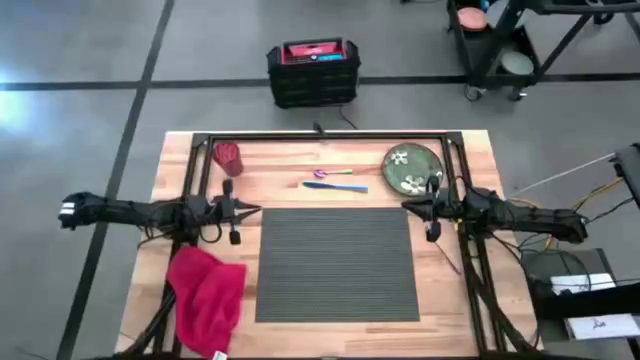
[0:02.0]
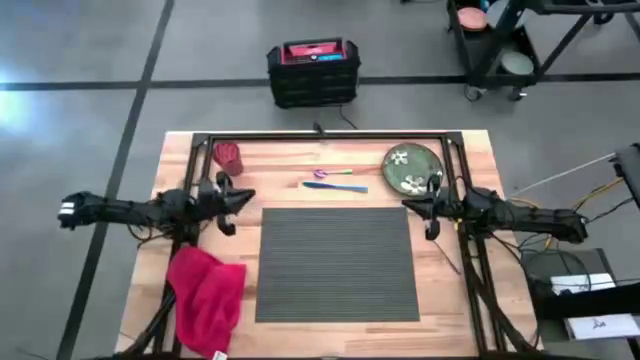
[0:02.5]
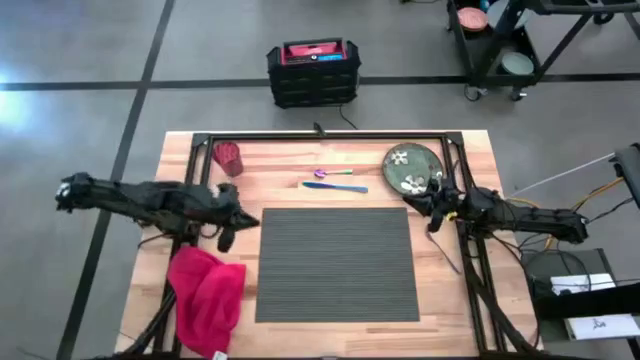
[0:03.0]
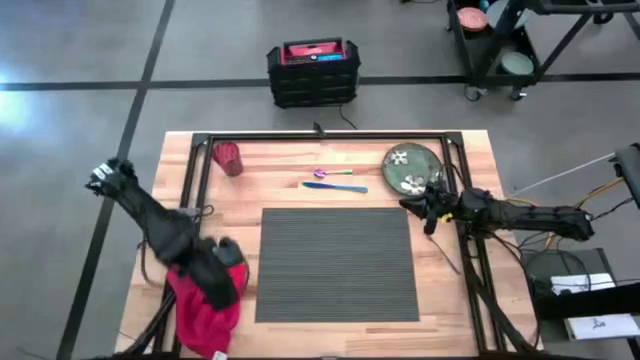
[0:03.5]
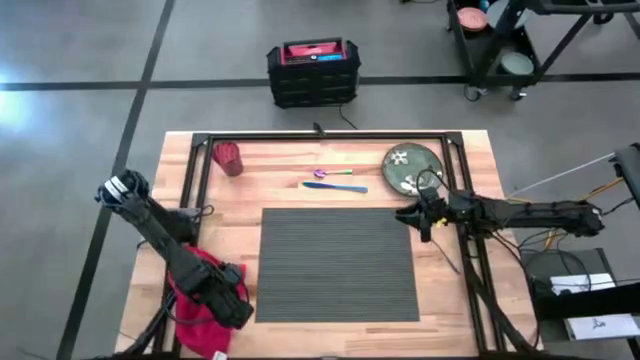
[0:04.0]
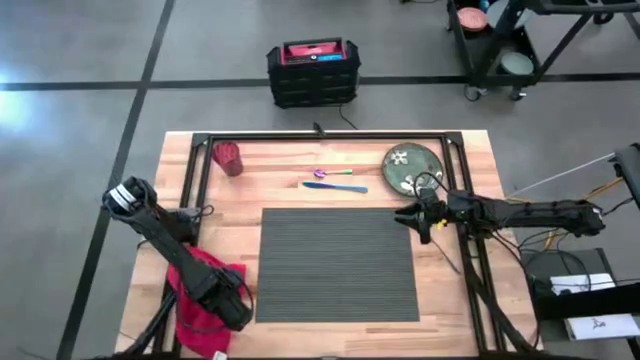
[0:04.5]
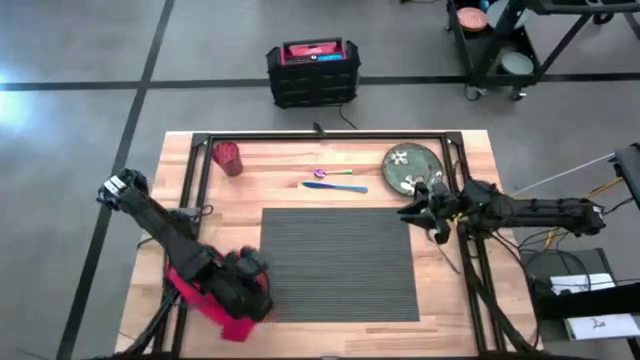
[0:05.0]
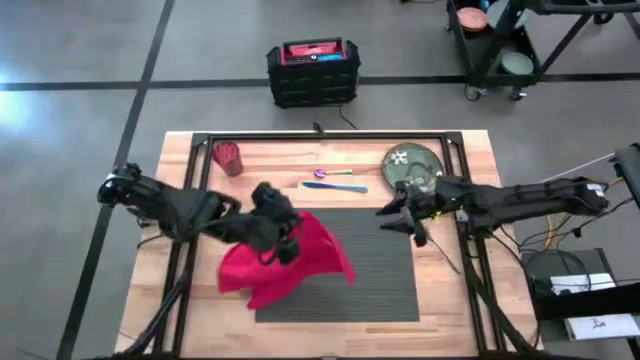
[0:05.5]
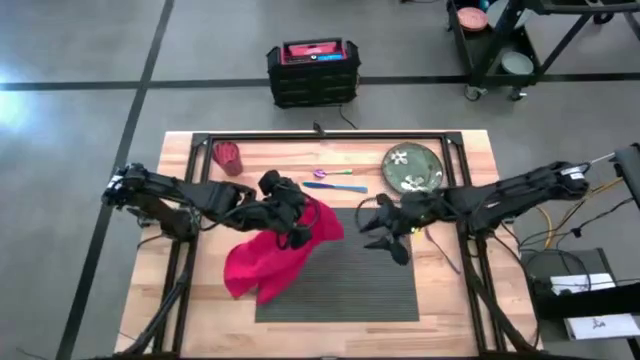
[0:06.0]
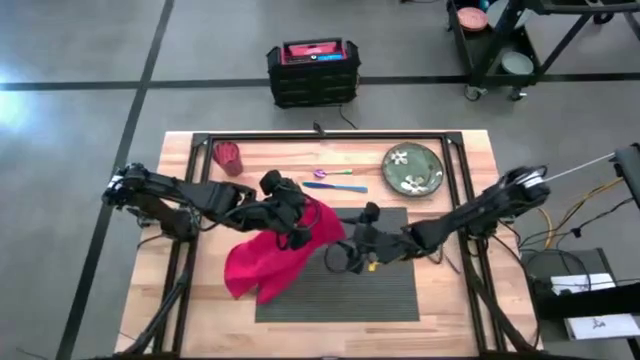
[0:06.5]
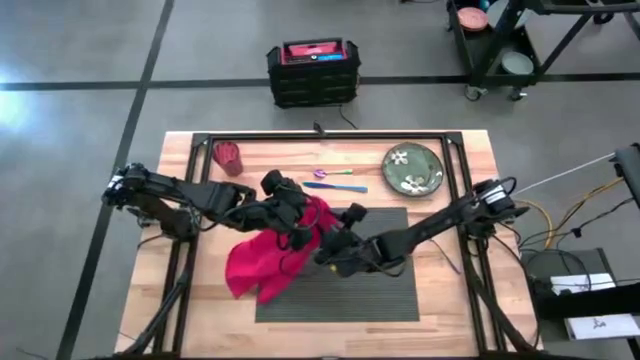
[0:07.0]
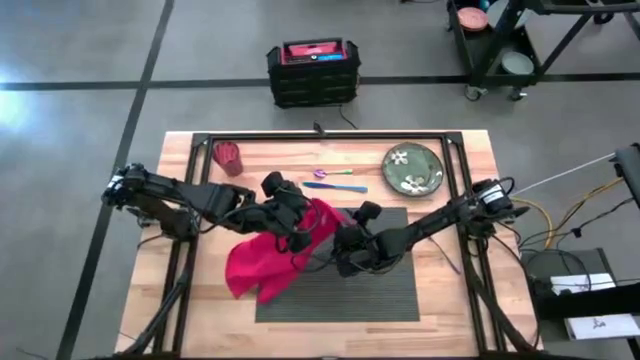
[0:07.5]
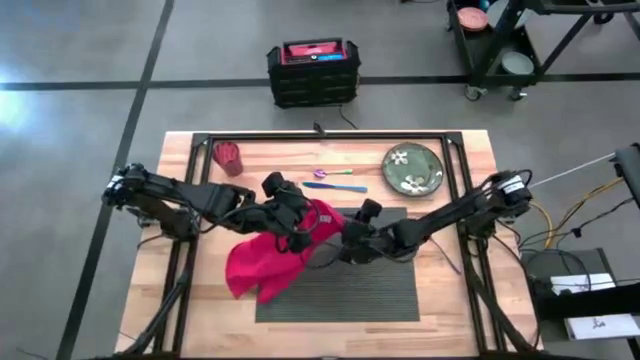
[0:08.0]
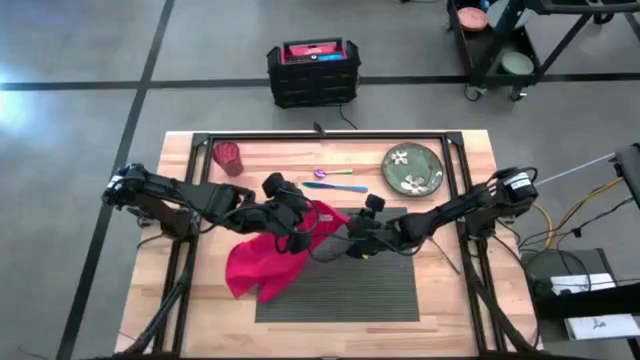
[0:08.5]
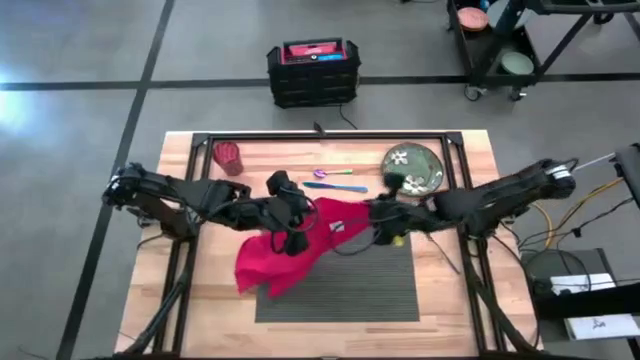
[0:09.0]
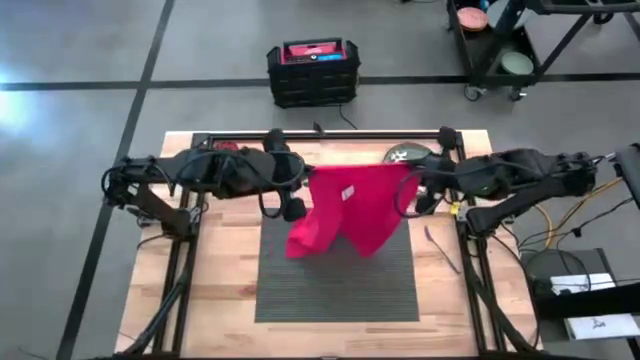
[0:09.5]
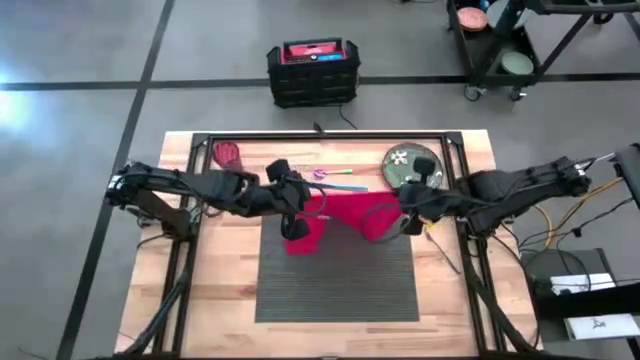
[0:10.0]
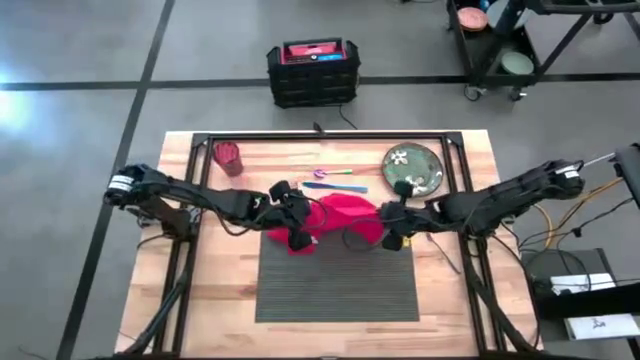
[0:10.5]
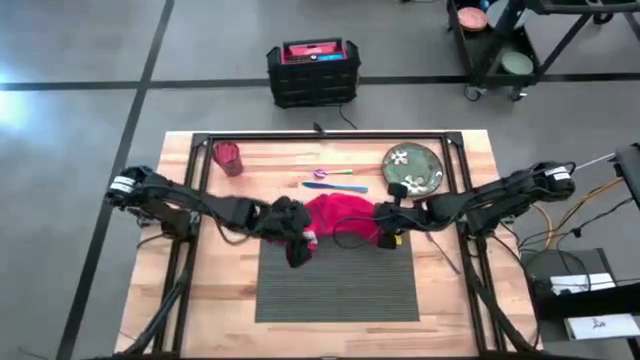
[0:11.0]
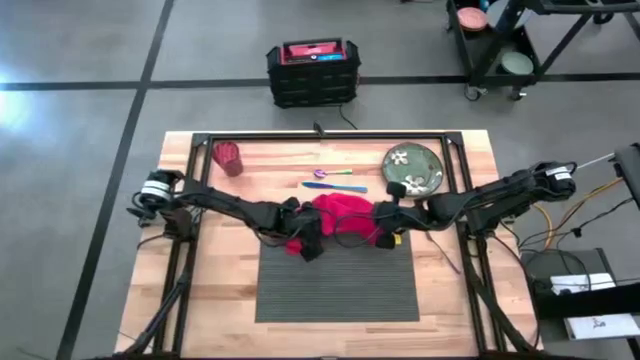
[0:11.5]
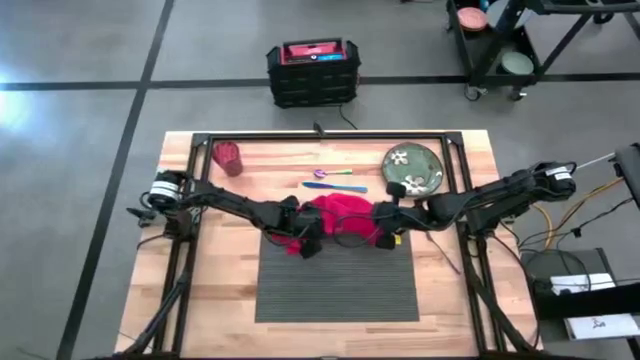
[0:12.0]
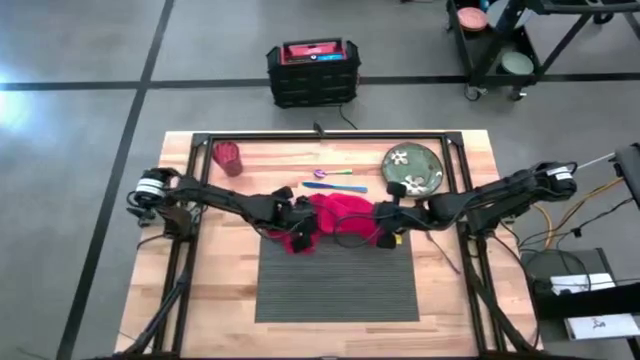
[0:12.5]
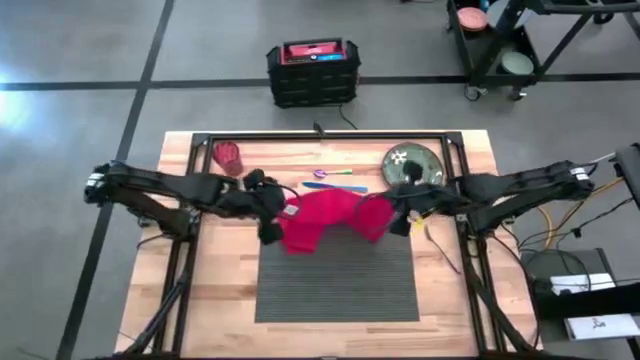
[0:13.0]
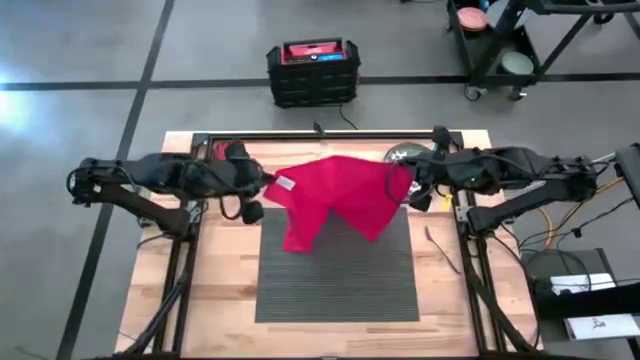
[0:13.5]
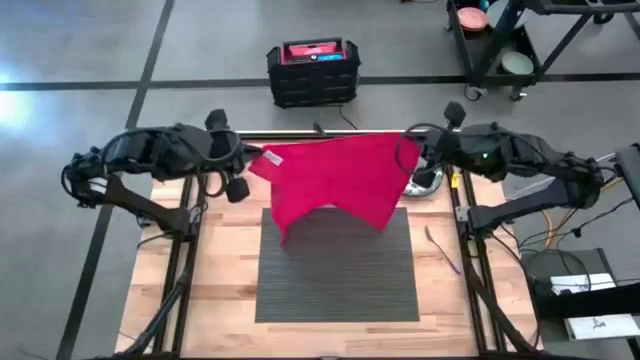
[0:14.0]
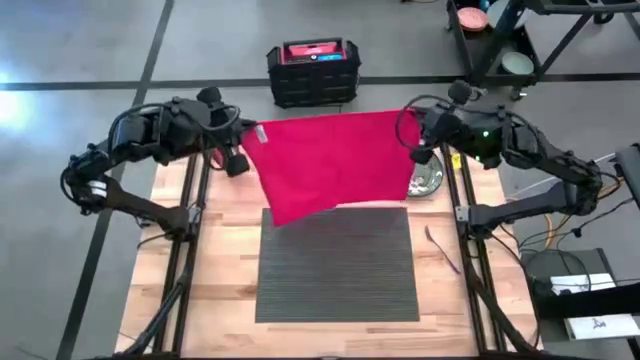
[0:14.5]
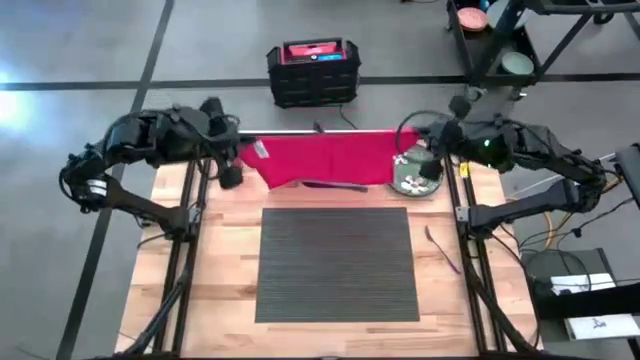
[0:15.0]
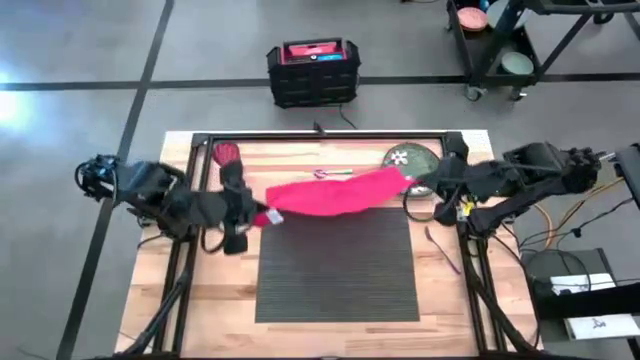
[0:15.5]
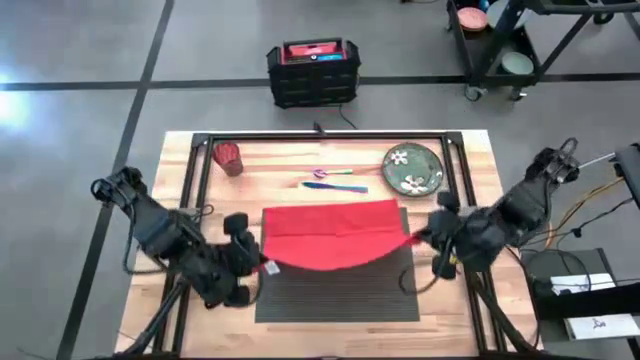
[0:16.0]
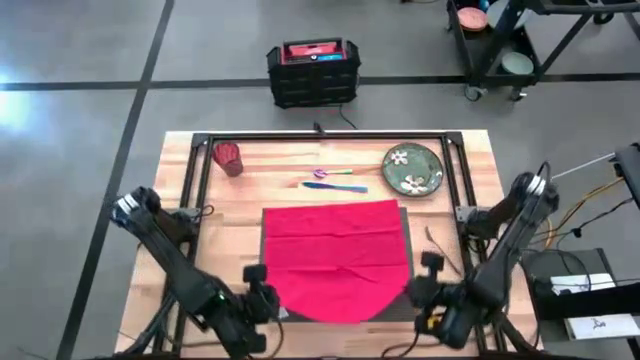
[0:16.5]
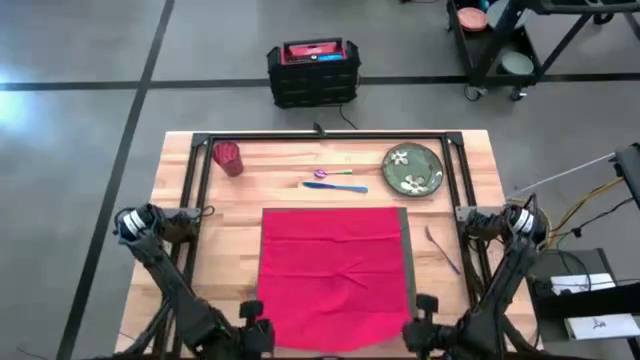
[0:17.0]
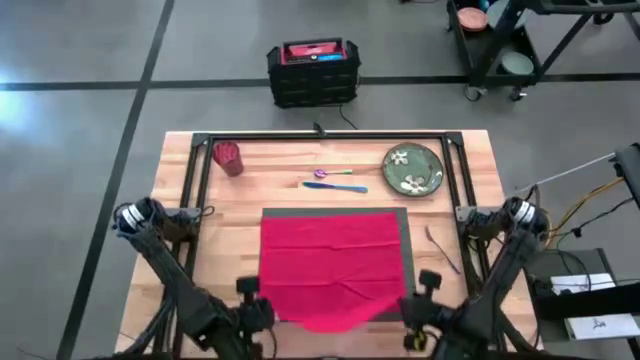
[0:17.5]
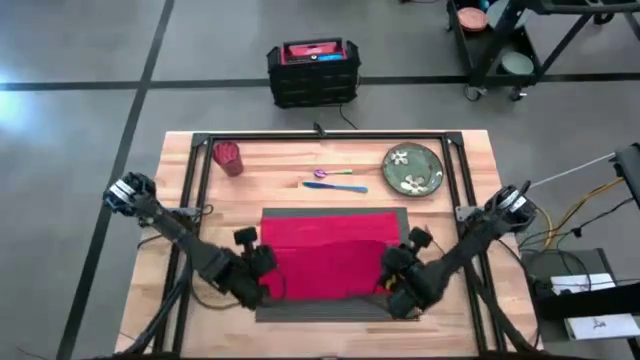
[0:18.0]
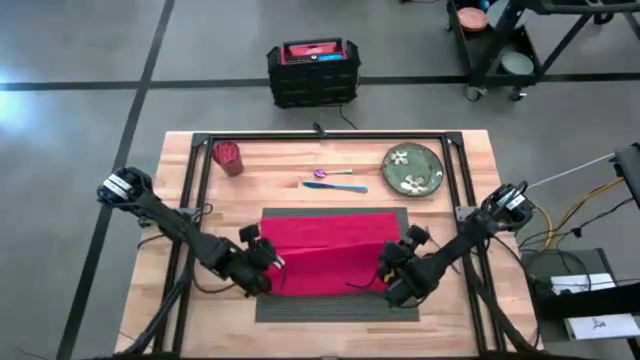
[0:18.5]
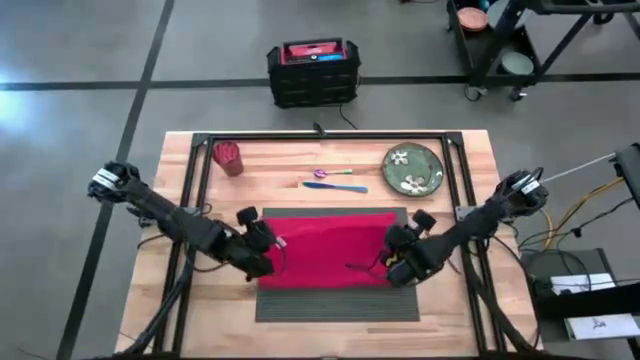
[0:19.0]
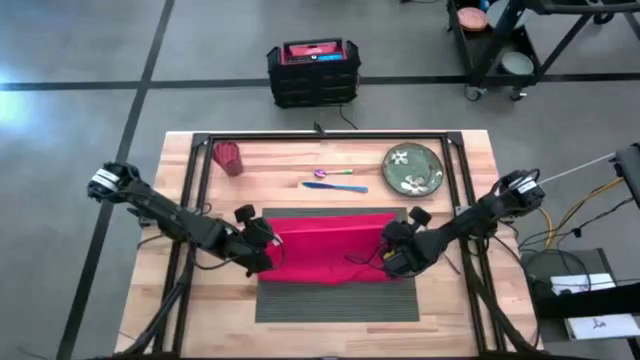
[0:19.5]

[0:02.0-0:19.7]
Task: Set table place
Fold the red napkin
